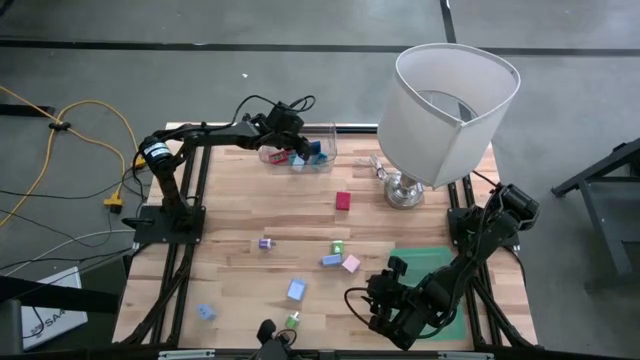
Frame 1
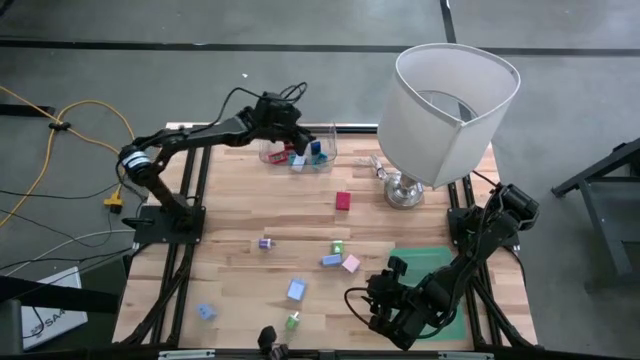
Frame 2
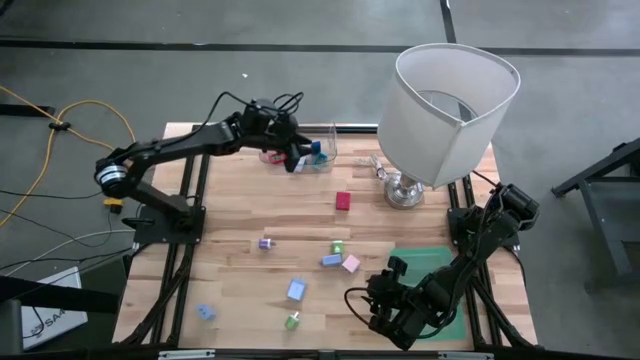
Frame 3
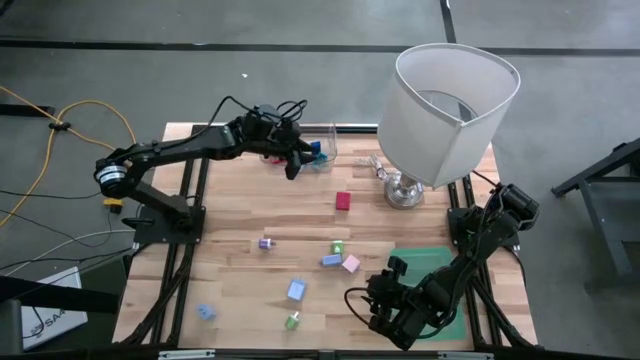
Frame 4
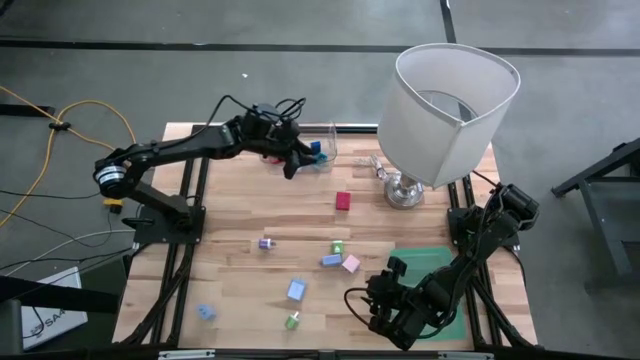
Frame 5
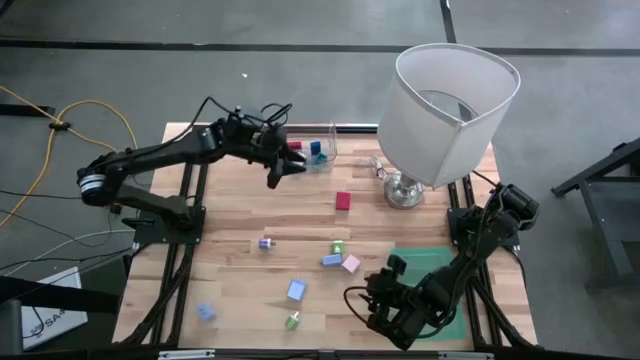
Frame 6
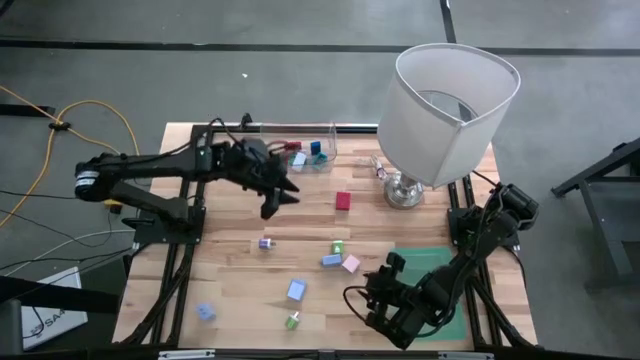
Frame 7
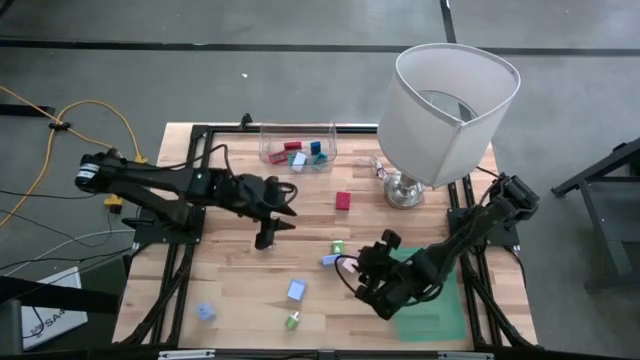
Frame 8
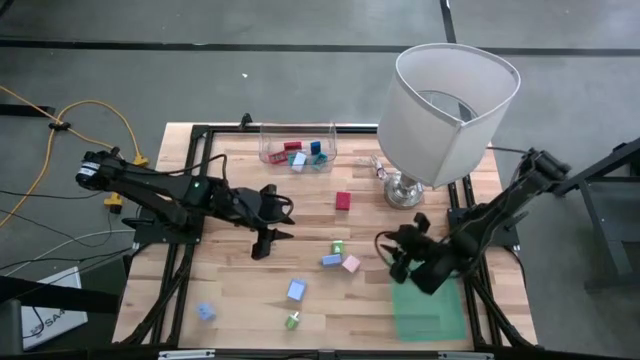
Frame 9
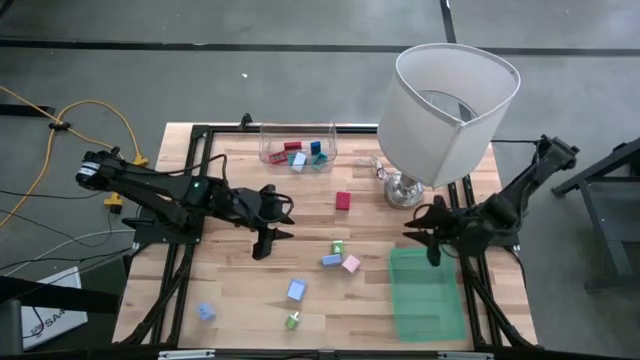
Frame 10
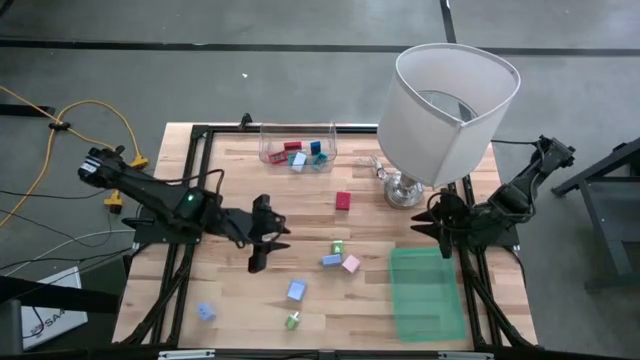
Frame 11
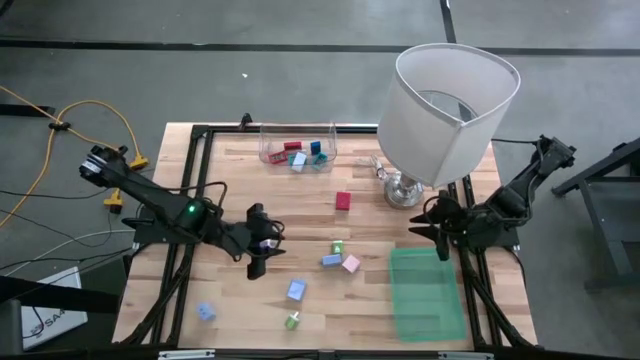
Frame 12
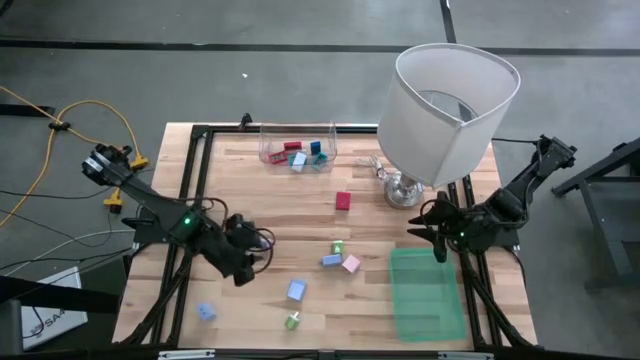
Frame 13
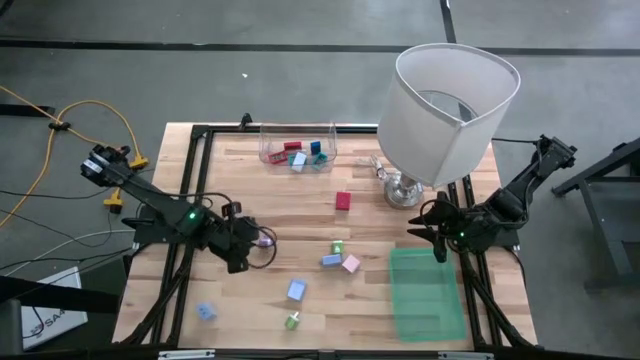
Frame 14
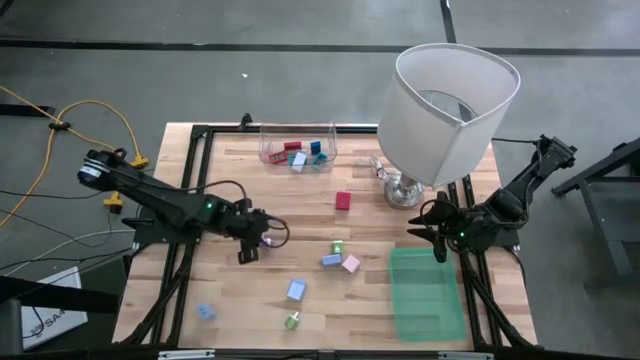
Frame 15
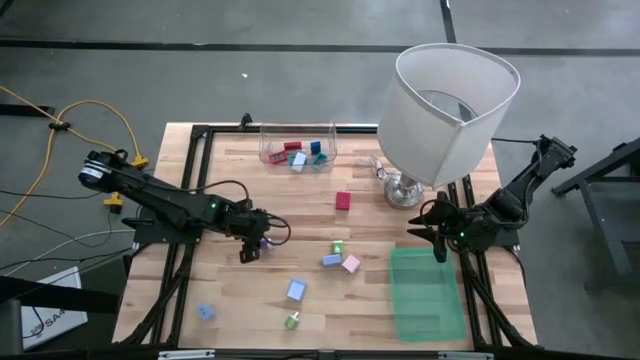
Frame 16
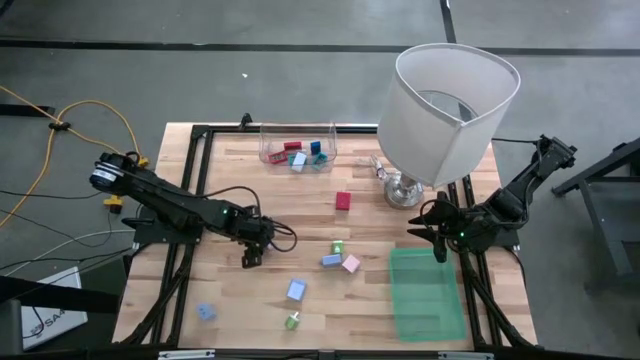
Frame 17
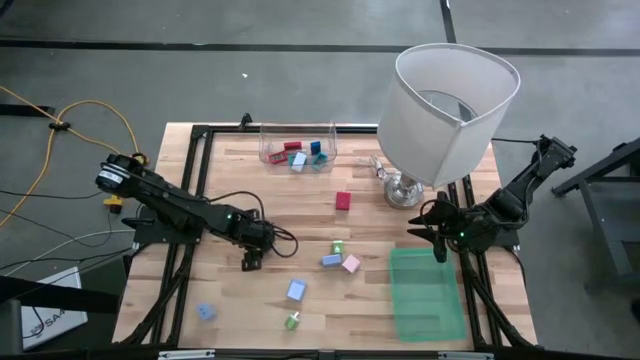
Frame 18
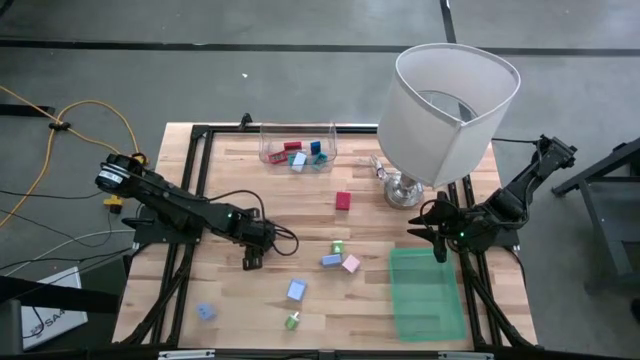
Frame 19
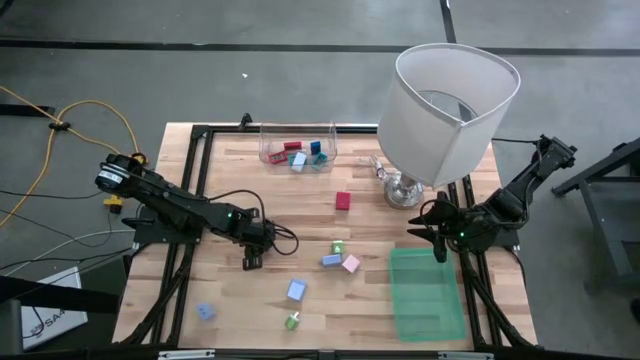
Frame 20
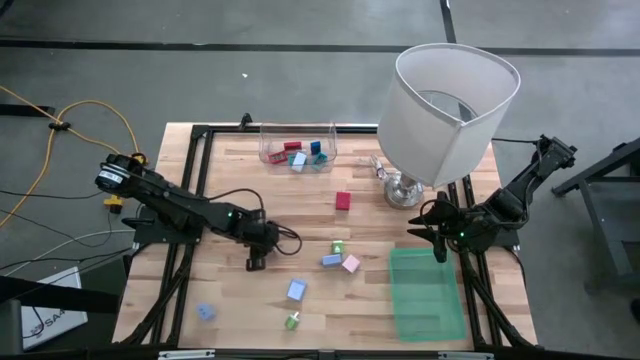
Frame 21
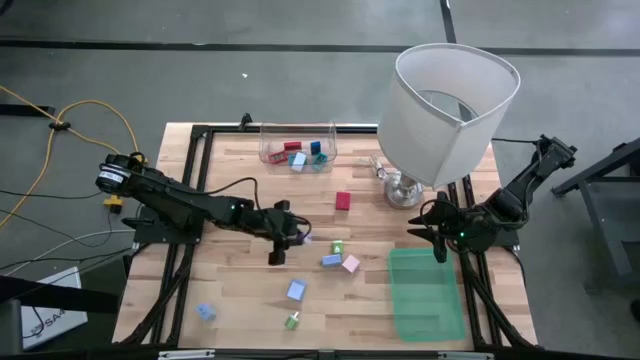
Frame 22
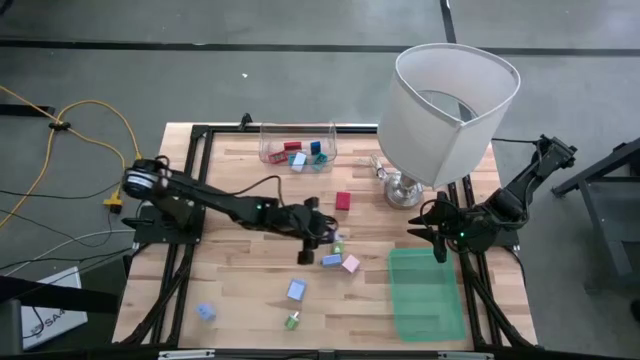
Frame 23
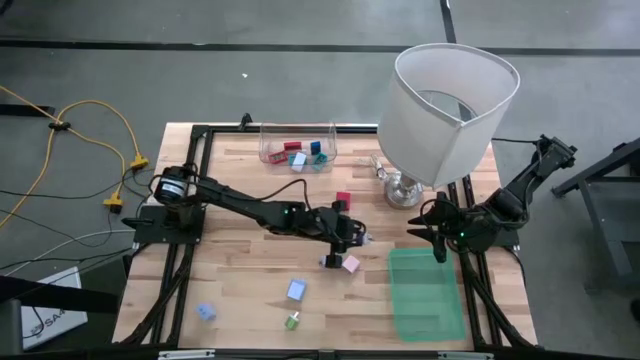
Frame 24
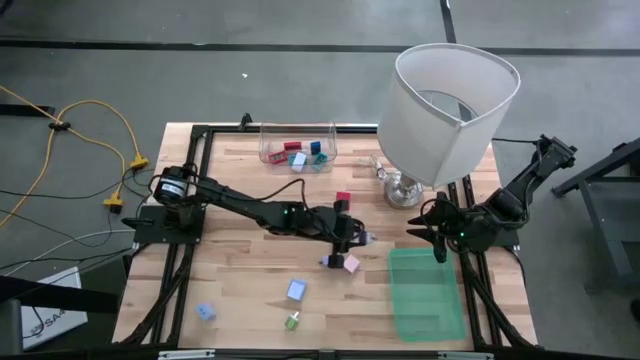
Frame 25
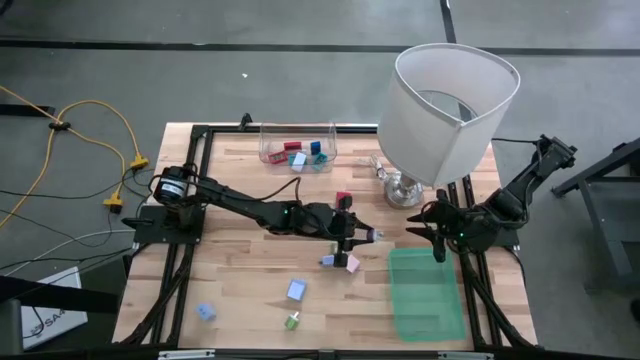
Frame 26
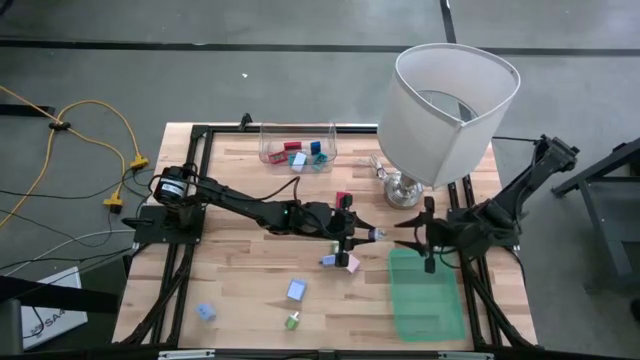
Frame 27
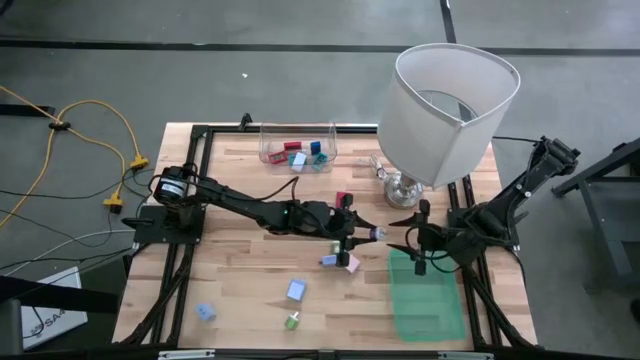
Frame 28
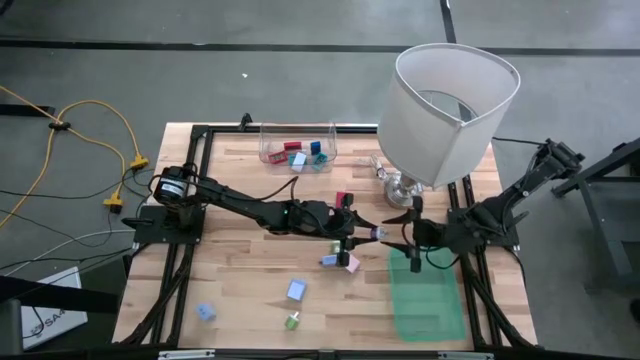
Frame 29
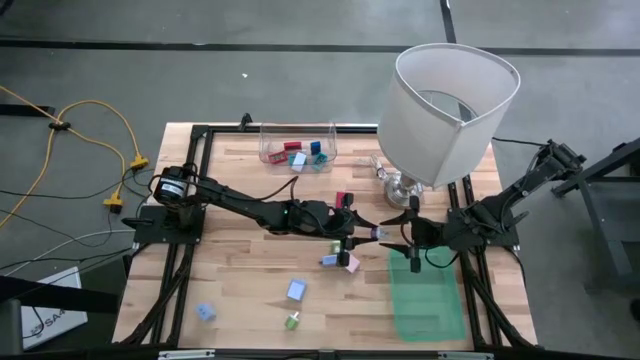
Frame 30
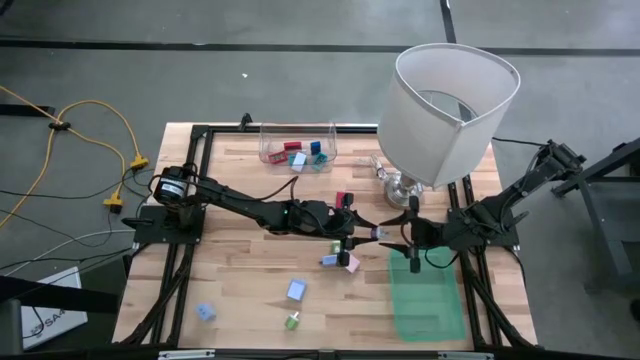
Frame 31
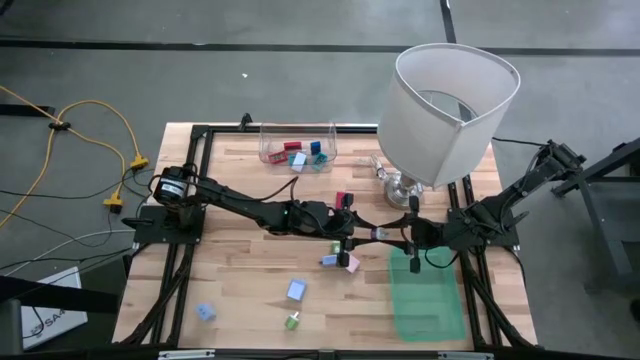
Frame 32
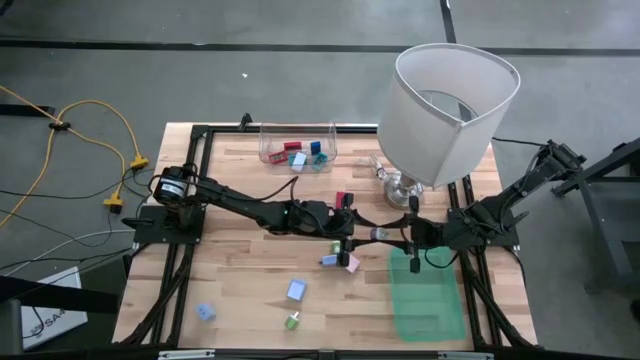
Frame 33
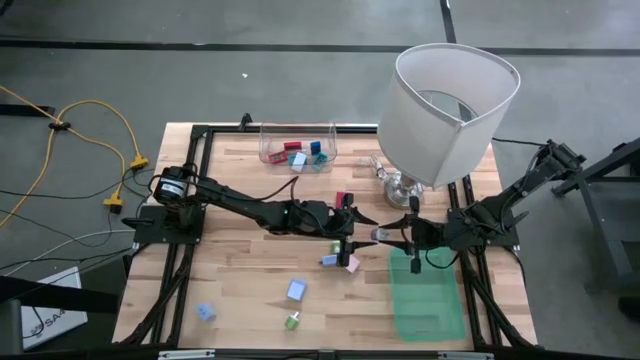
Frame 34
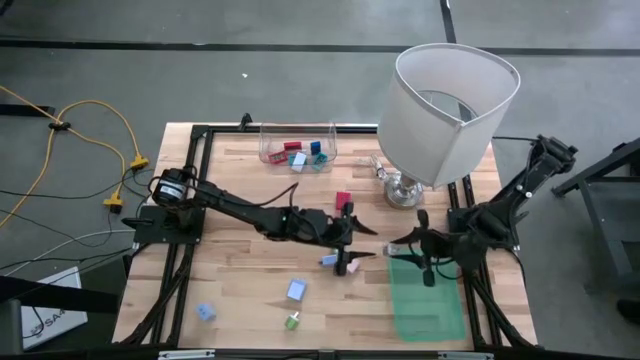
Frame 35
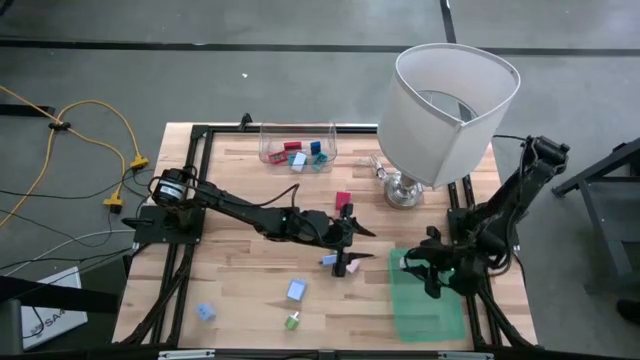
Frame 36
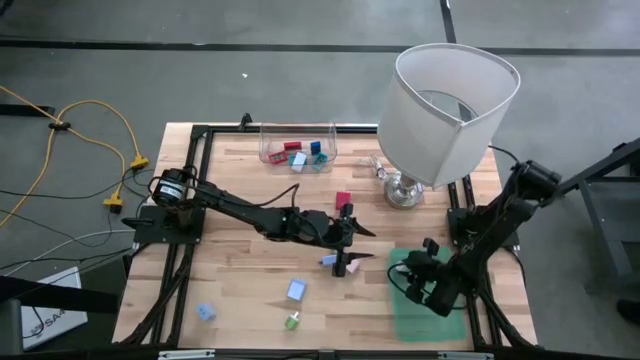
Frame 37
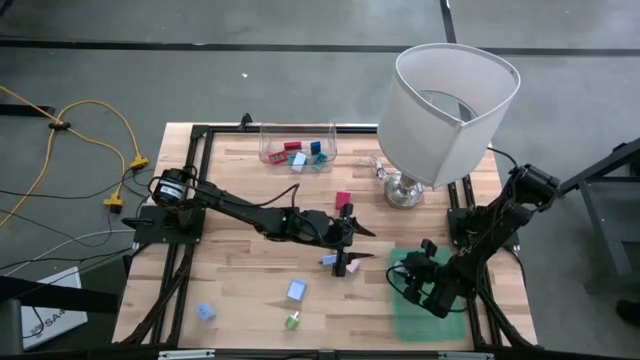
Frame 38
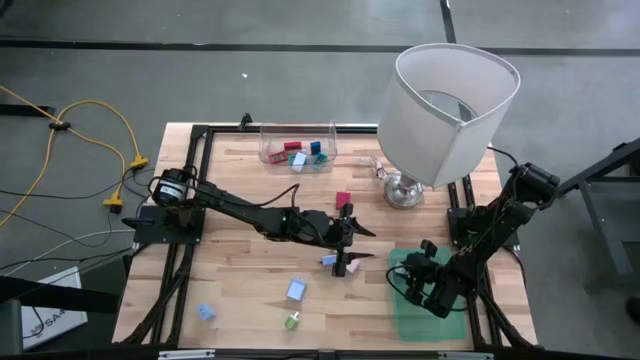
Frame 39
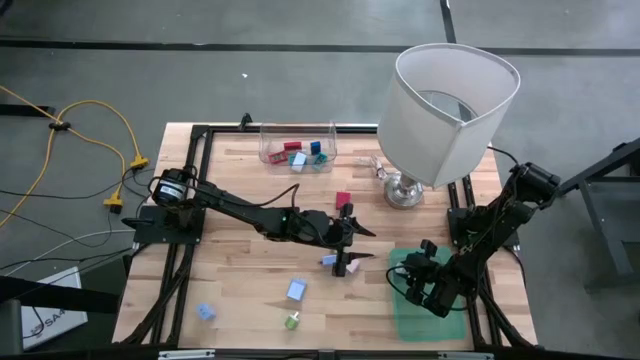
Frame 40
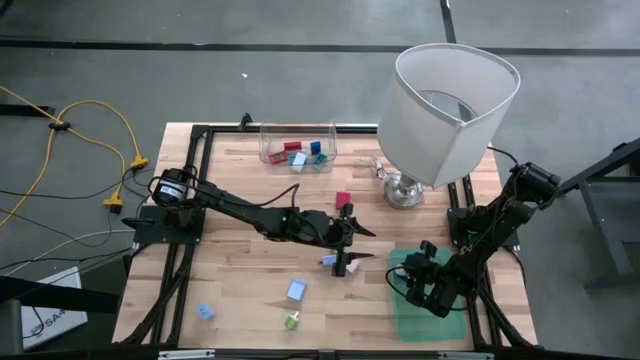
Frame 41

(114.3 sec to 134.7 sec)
Task: Pick & Place Office items
Put the purple charger adapter into the green bin

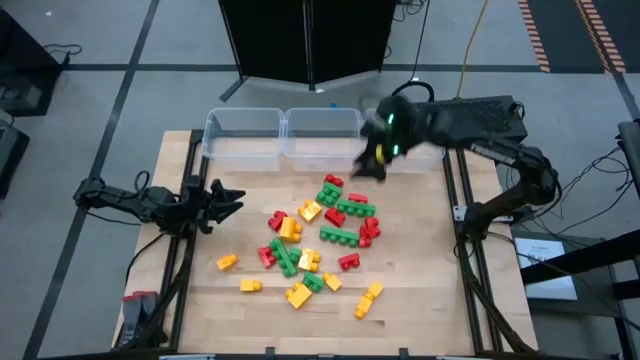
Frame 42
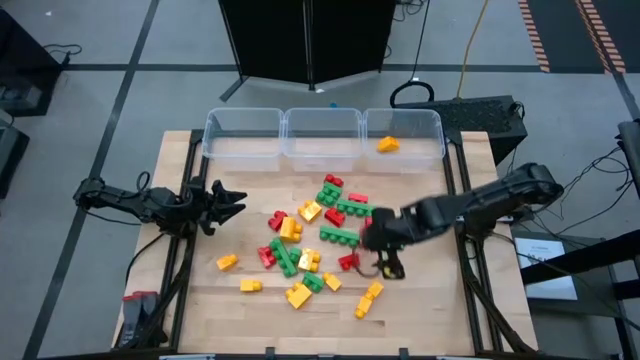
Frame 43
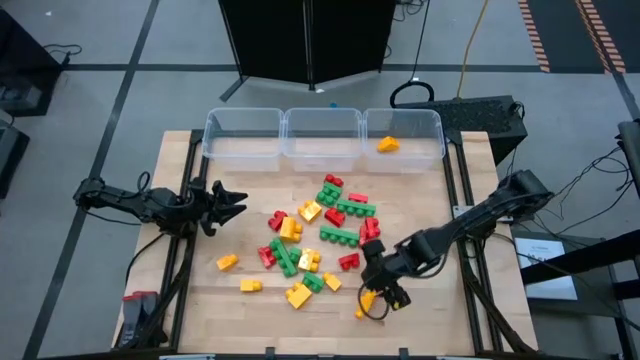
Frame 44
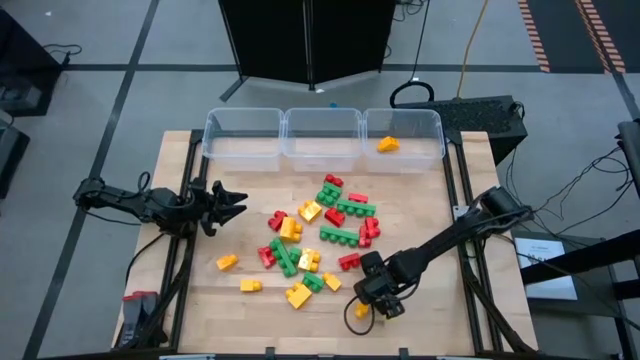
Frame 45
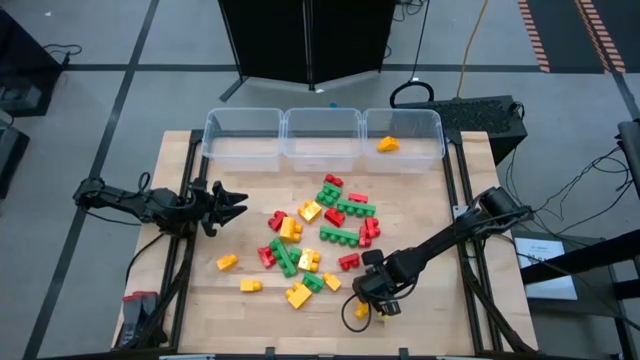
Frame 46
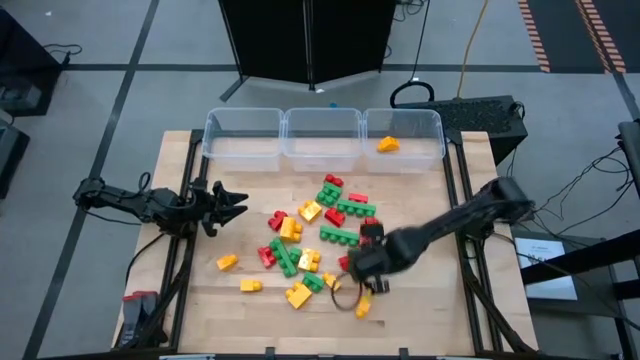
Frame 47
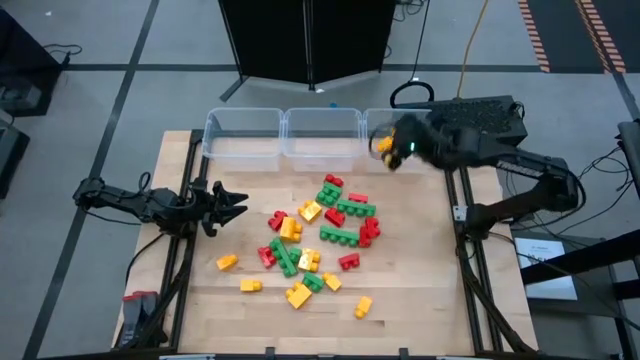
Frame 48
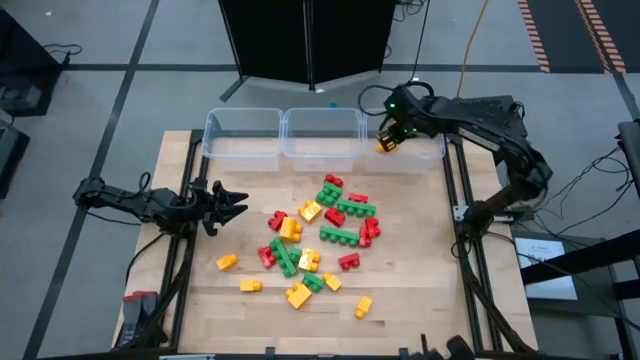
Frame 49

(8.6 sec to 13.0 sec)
Task: Sort blocks
Put the yellow game piece with 1 stud into the right transparent bin
